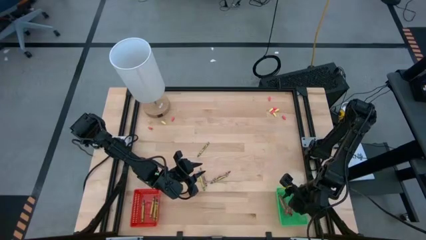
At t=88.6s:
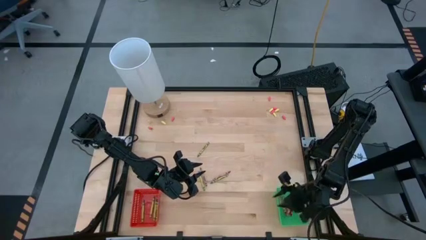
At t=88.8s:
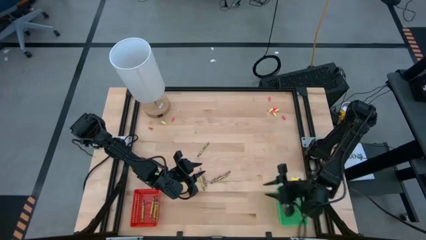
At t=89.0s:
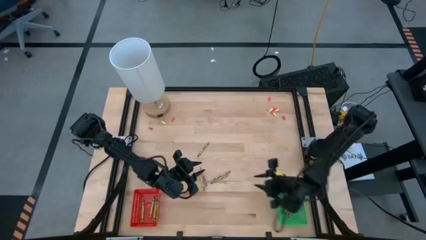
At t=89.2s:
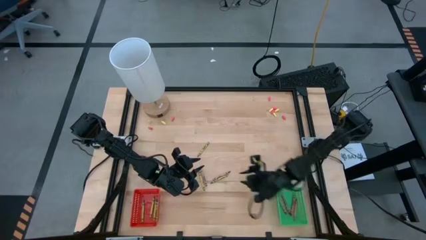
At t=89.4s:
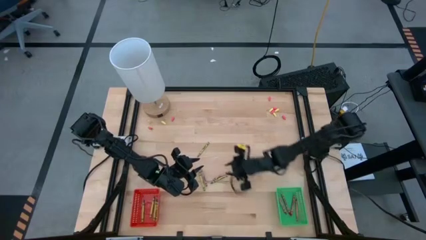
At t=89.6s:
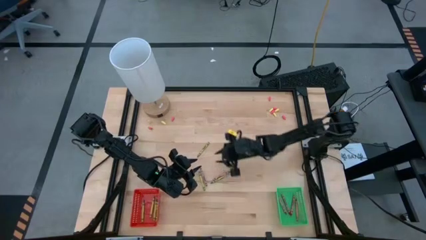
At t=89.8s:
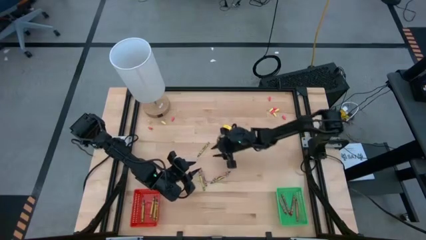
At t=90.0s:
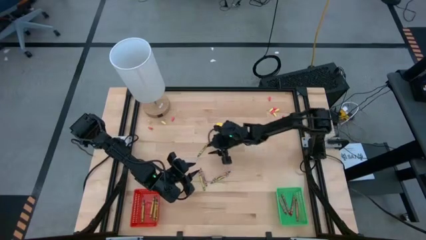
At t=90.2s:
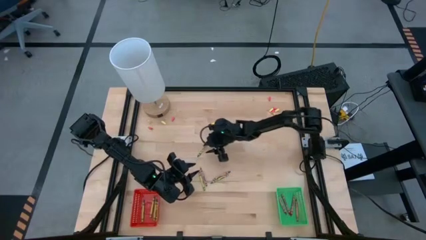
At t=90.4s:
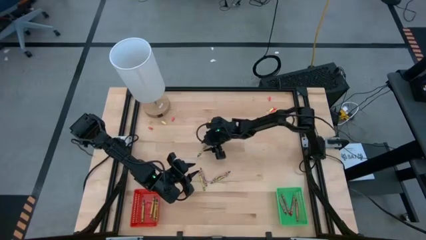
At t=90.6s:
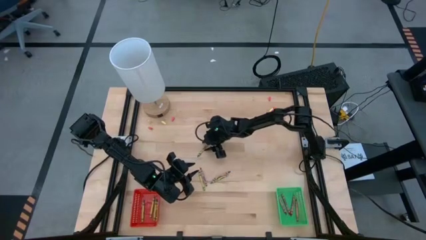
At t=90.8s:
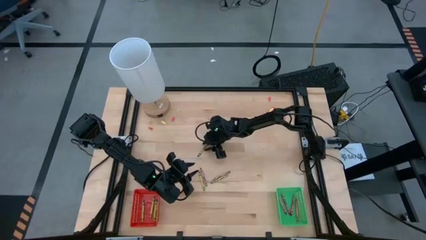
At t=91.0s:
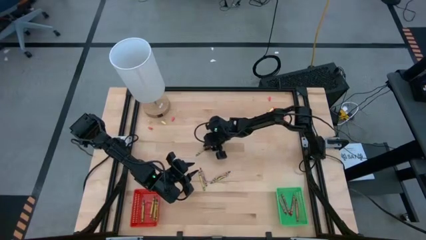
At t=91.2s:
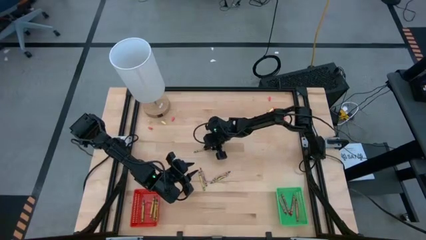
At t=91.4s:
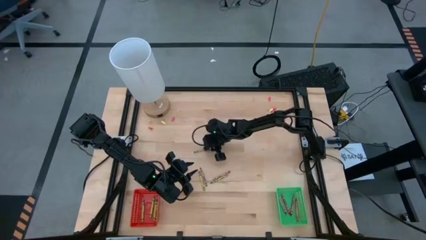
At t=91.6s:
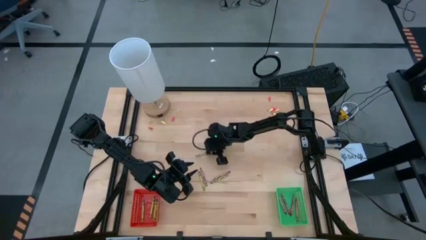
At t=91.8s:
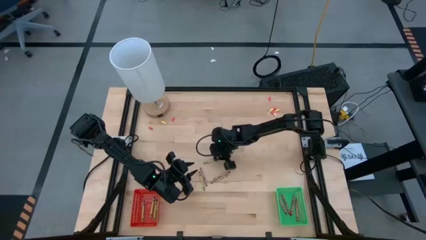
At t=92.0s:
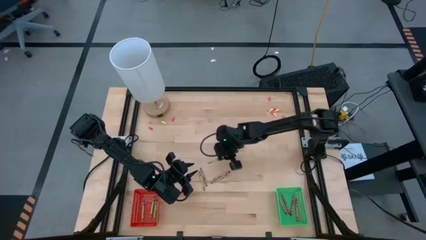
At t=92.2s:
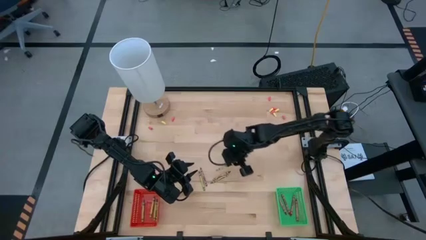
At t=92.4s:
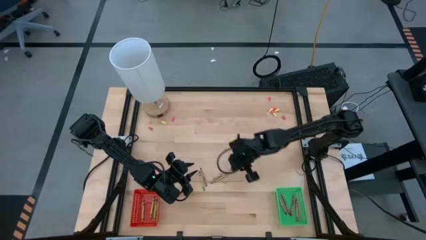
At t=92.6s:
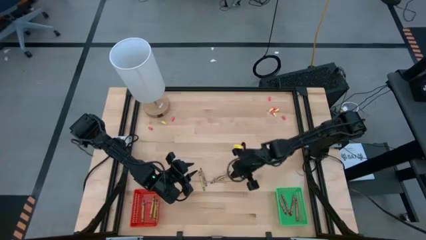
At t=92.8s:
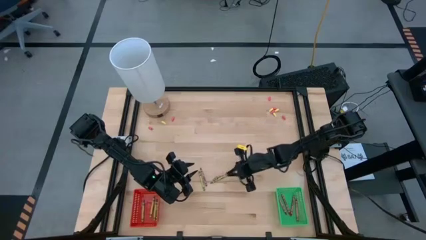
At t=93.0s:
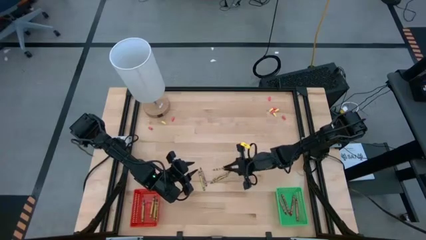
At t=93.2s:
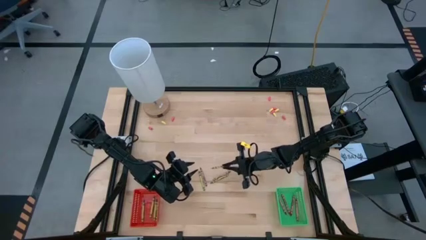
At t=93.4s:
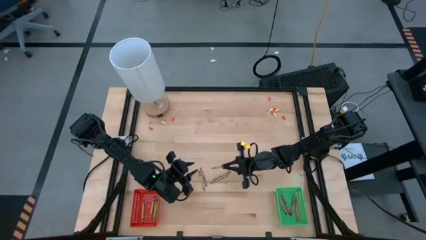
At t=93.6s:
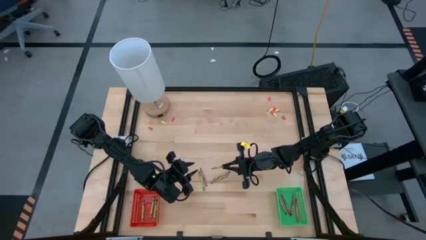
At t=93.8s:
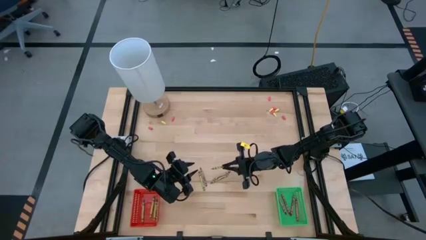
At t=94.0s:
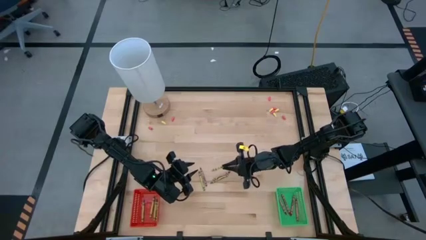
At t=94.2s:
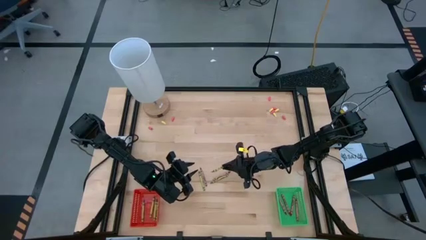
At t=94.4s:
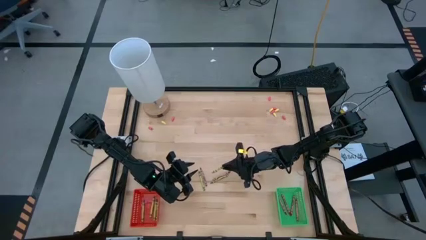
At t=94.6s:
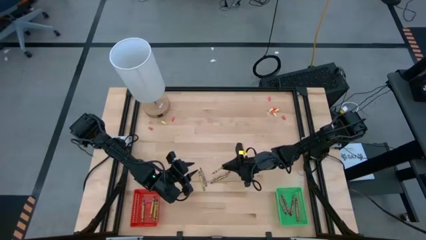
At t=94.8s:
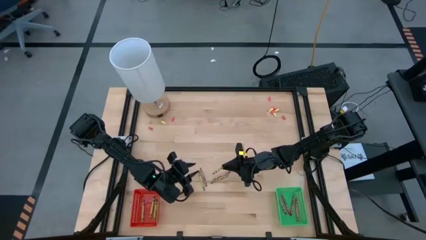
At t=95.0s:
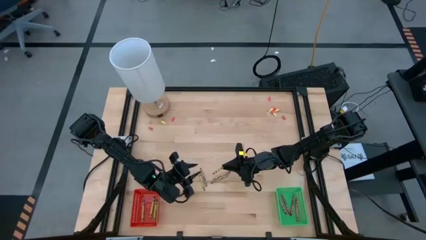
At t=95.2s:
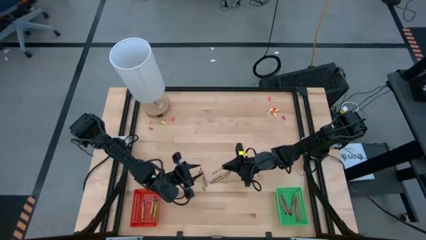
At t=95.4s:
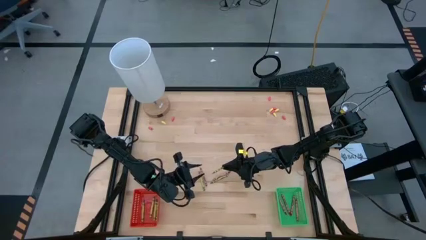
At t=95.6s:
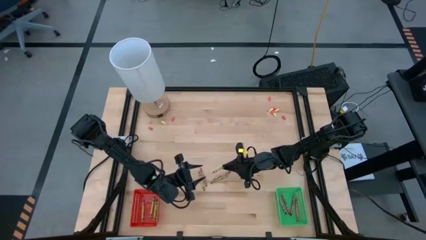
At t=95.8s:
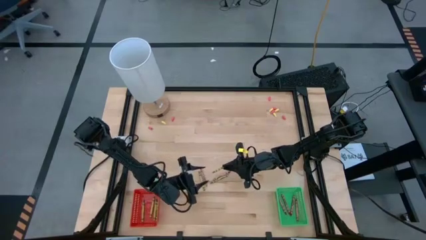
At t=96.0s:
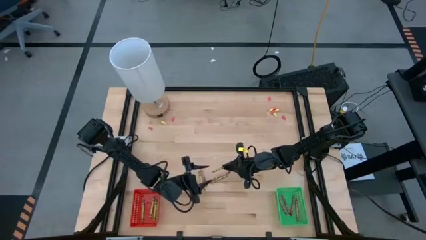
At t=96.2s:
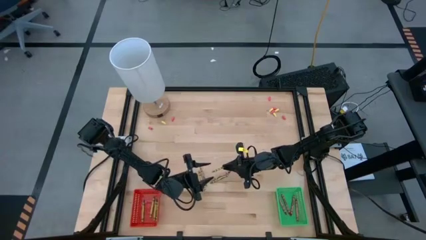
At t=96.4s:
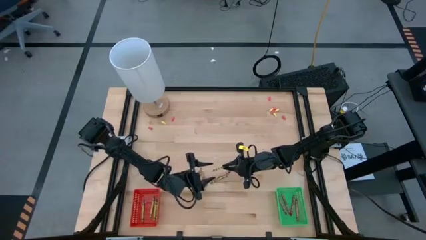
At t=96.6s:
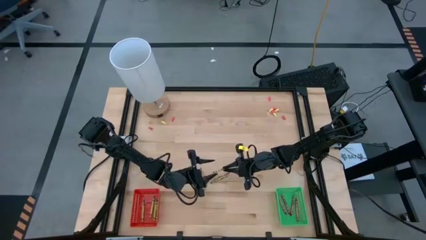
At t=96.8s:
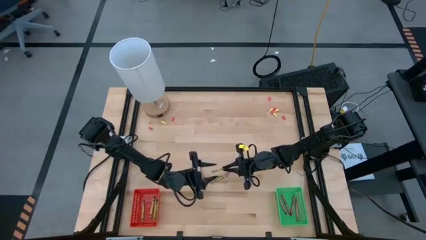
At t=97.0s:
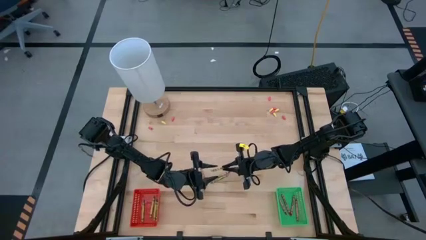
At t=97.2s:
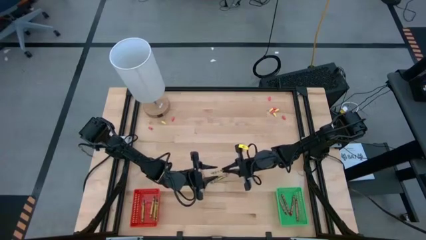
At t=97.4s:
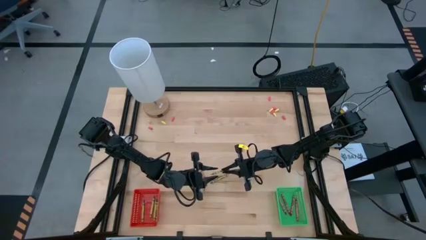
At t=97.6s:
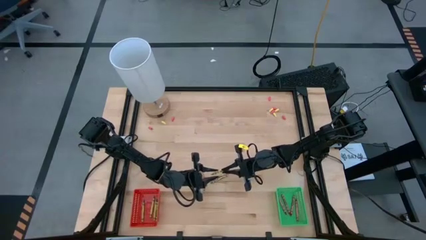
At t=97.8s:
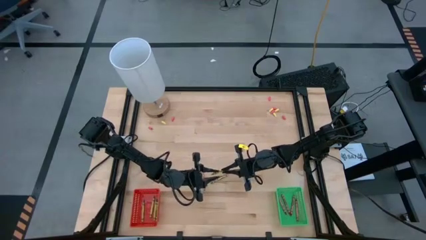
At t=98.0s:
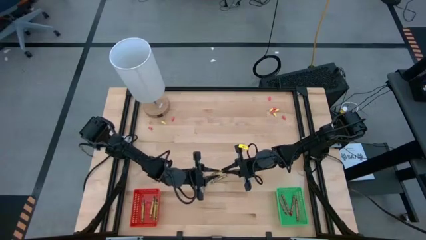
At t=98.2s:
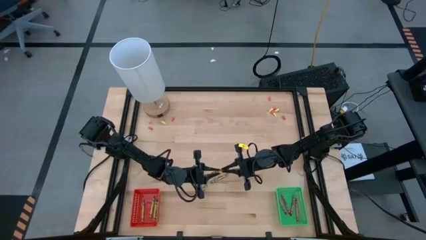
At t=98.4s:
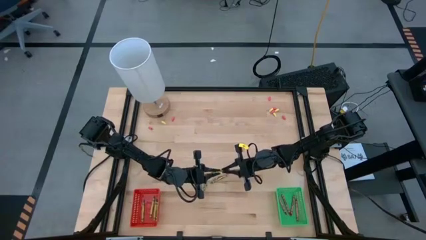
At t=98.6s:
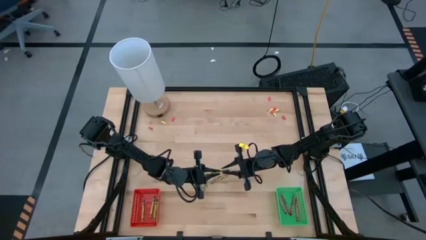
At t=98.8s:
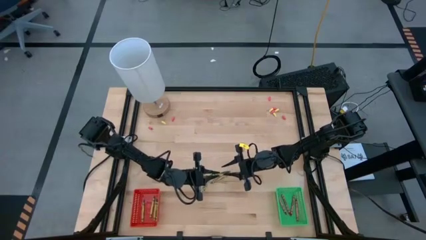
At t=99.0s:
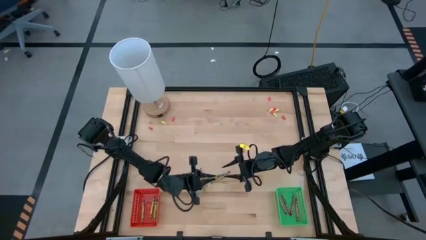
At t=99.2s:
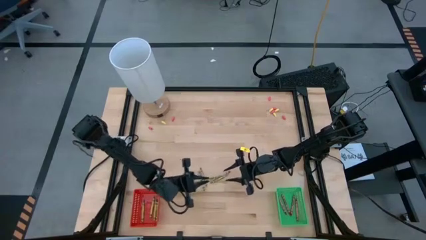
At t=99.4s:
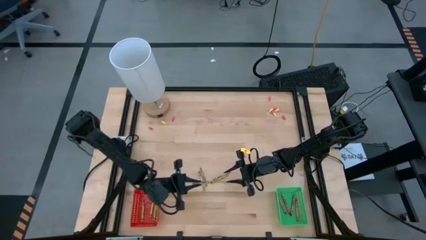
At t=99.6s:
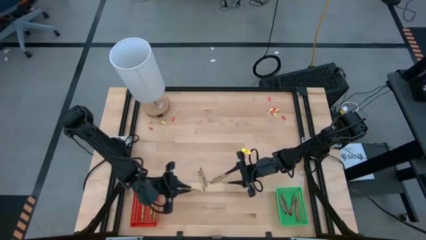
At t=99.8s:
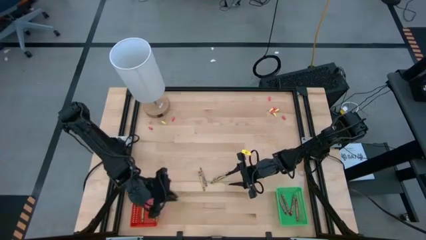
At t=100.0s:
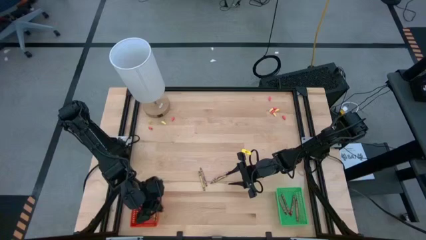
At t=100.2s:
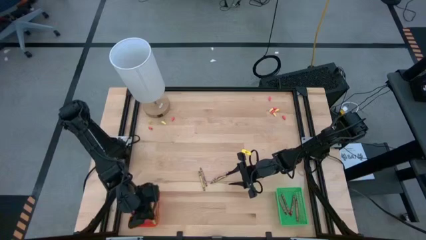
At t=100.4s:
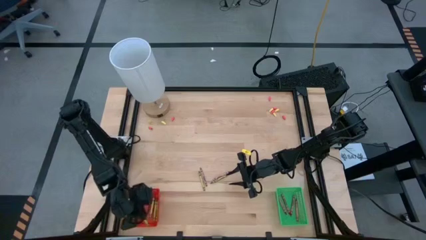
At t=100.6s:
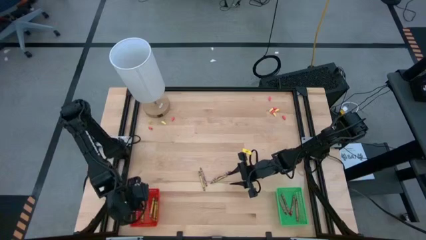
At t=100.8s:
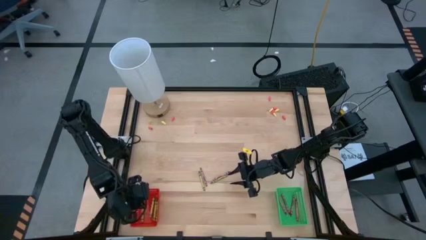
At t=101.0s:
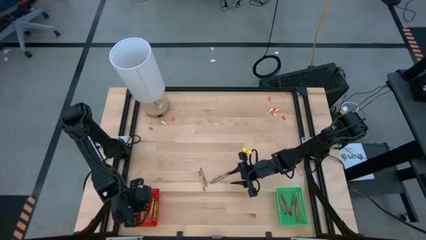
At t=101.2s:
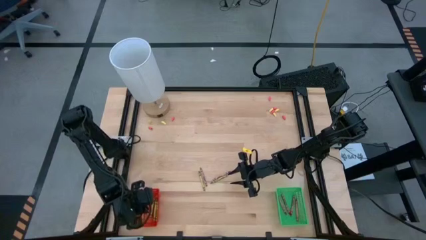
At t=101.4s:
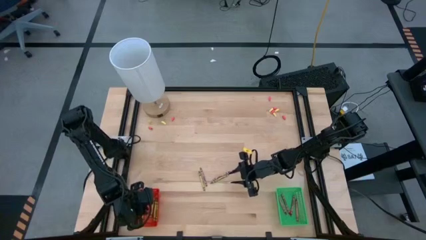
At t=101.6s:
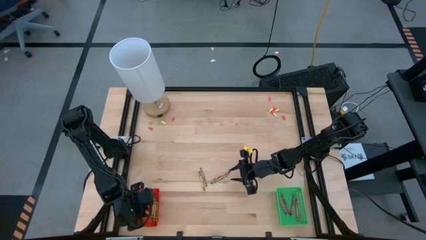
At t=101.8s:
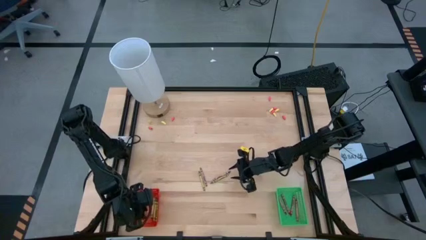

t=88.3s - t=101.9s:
Task: Sort crayons
Put the green crayon into the red bin
